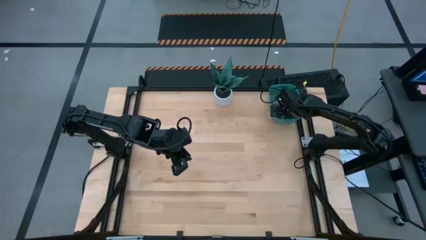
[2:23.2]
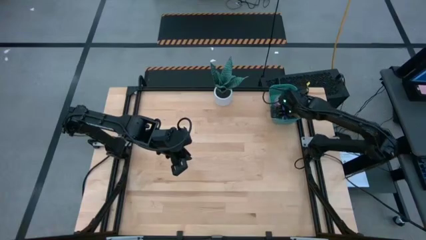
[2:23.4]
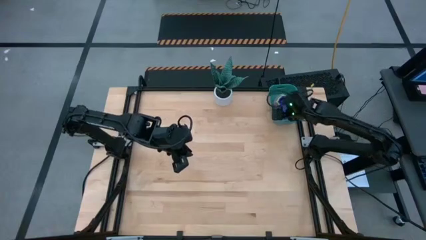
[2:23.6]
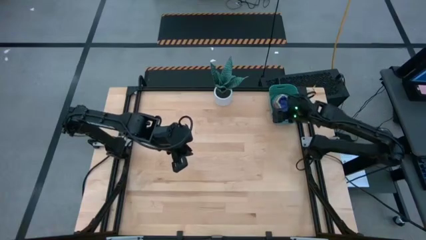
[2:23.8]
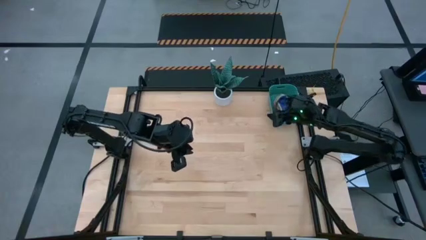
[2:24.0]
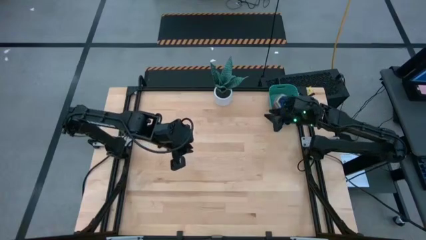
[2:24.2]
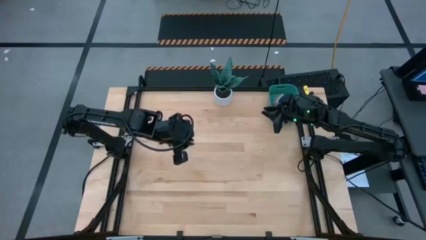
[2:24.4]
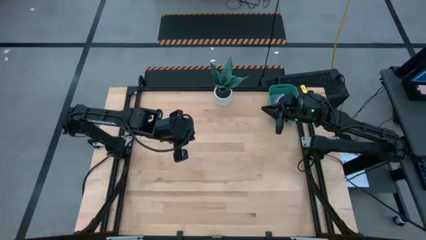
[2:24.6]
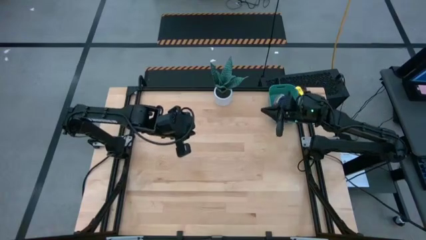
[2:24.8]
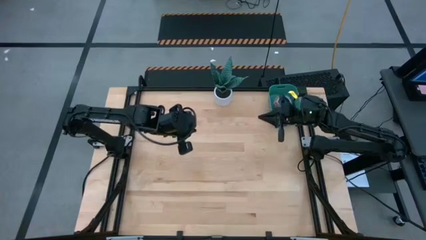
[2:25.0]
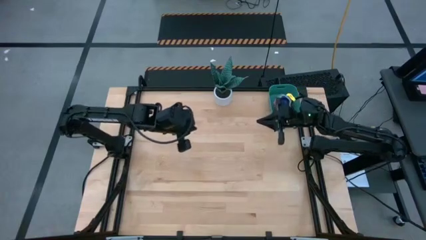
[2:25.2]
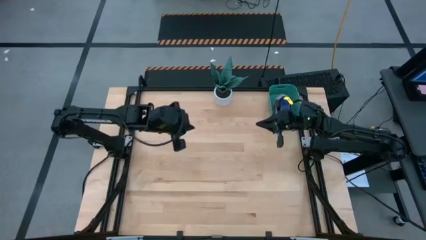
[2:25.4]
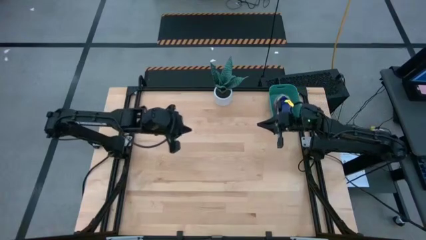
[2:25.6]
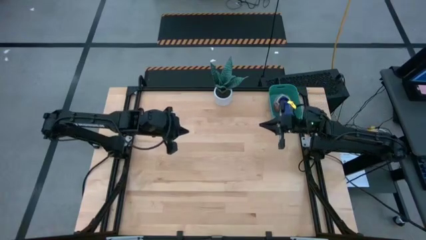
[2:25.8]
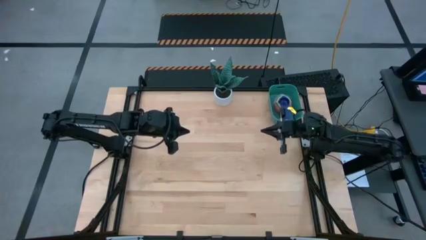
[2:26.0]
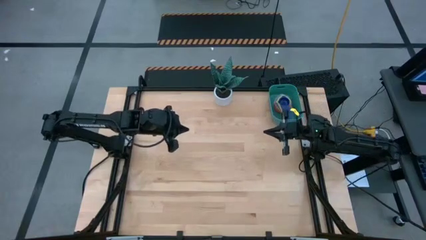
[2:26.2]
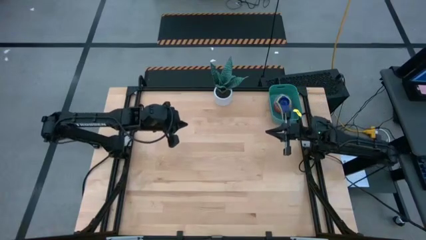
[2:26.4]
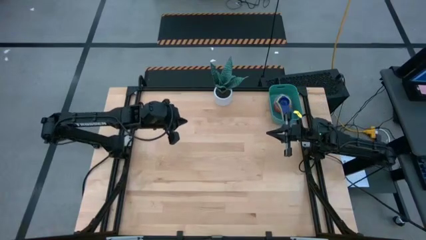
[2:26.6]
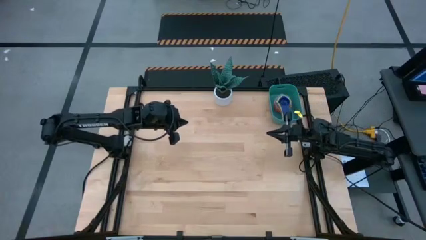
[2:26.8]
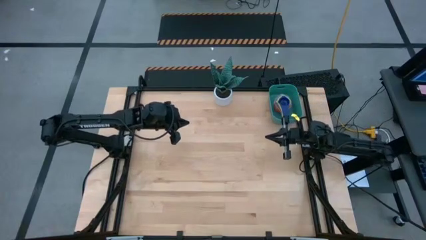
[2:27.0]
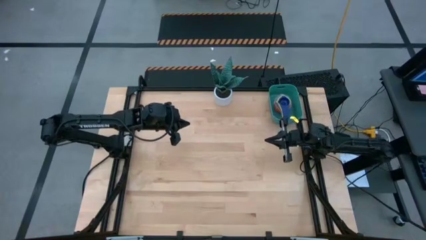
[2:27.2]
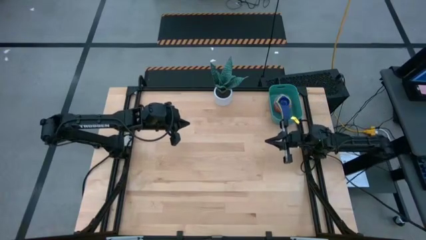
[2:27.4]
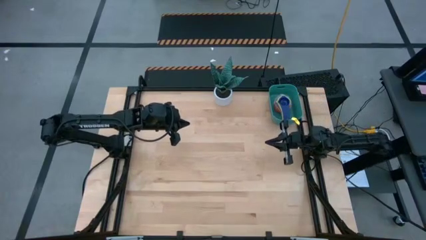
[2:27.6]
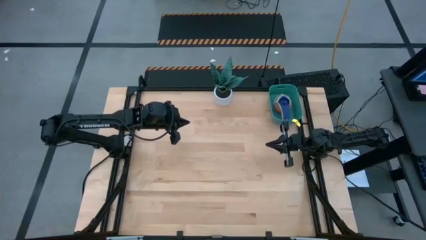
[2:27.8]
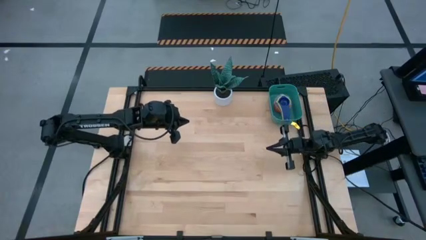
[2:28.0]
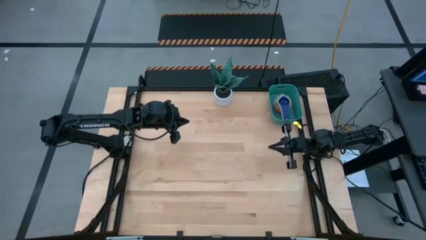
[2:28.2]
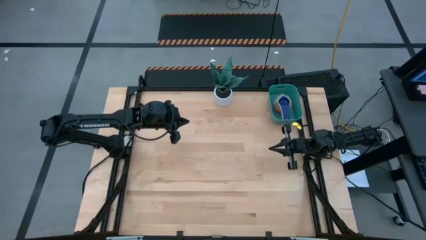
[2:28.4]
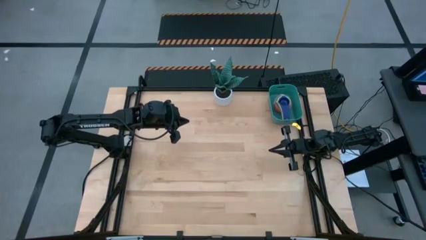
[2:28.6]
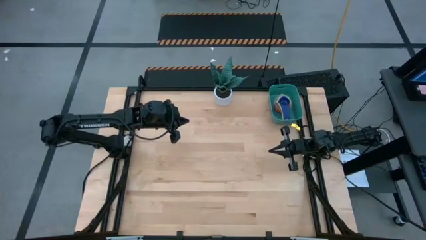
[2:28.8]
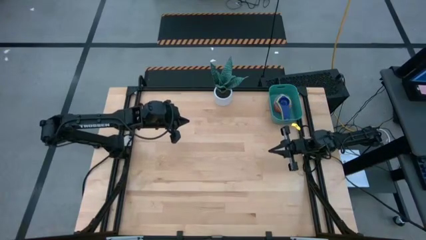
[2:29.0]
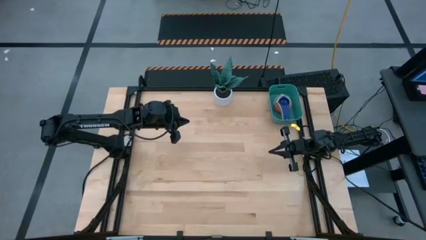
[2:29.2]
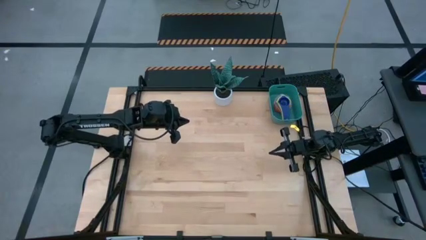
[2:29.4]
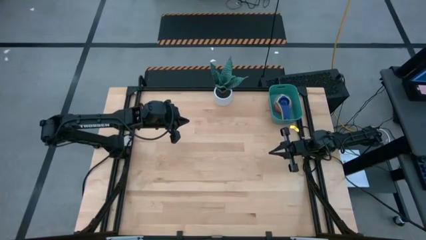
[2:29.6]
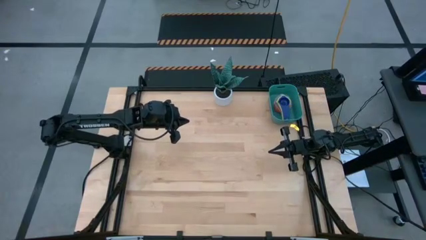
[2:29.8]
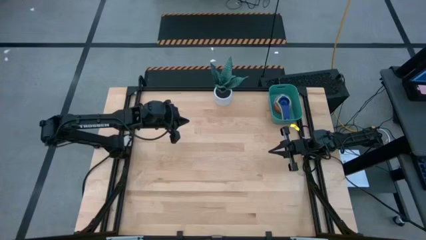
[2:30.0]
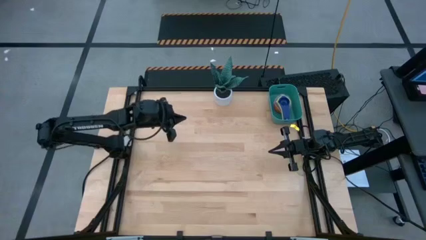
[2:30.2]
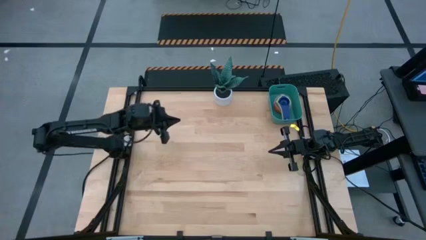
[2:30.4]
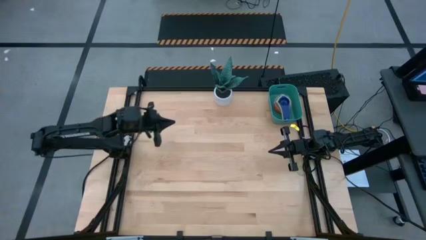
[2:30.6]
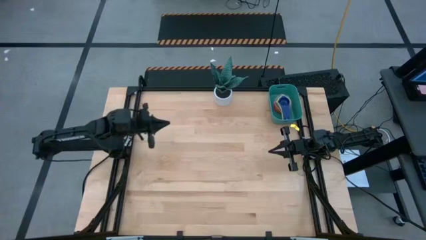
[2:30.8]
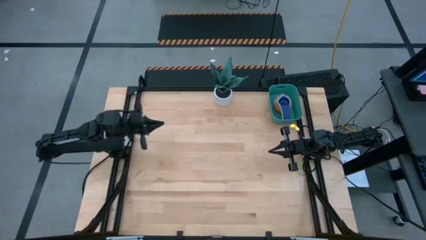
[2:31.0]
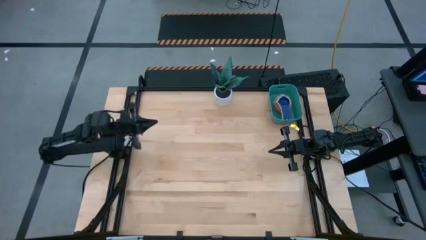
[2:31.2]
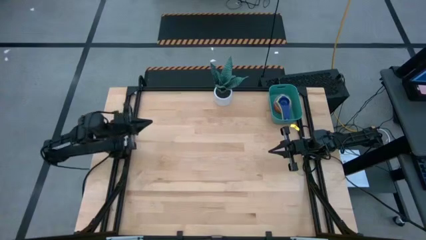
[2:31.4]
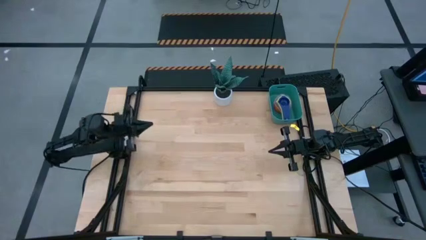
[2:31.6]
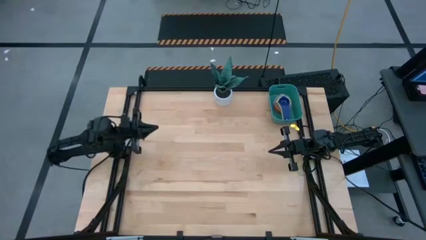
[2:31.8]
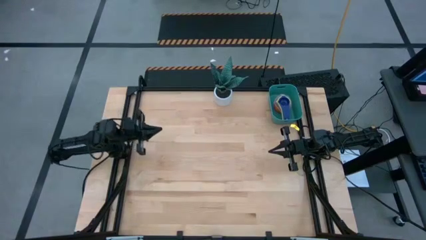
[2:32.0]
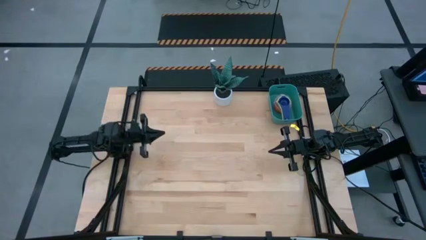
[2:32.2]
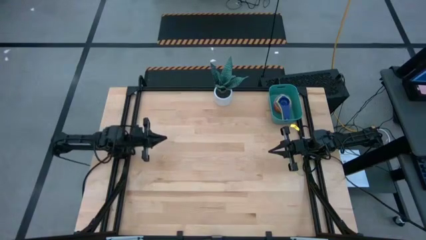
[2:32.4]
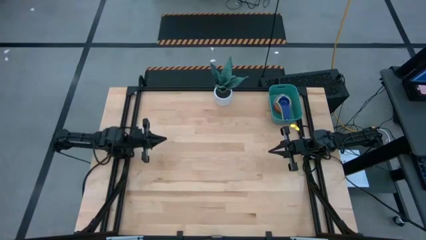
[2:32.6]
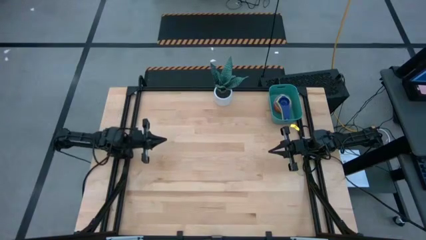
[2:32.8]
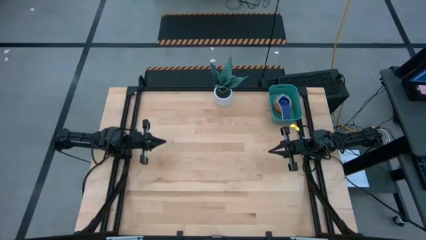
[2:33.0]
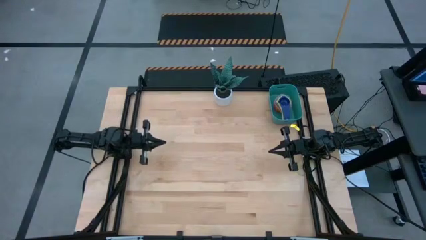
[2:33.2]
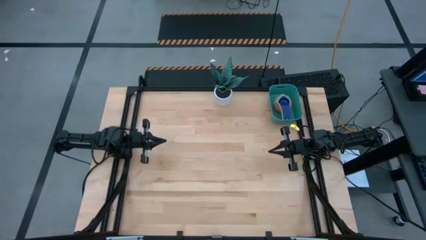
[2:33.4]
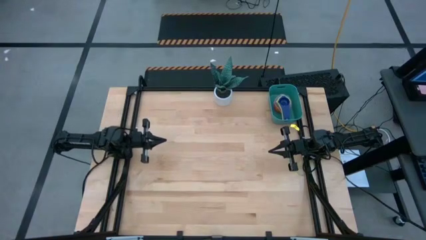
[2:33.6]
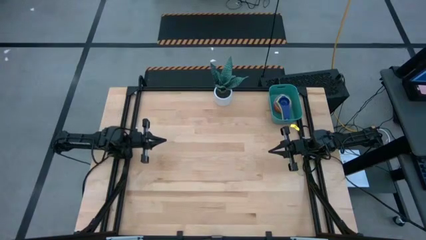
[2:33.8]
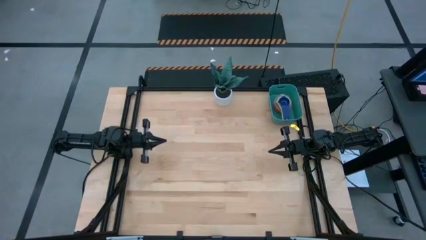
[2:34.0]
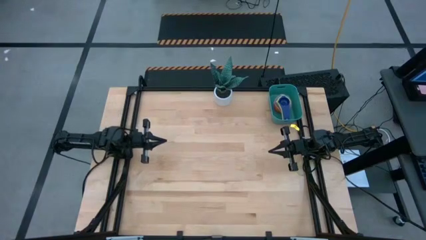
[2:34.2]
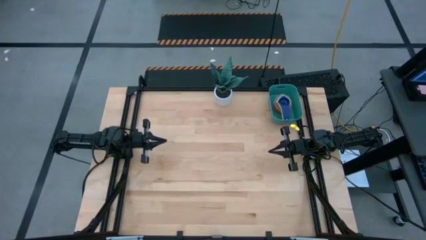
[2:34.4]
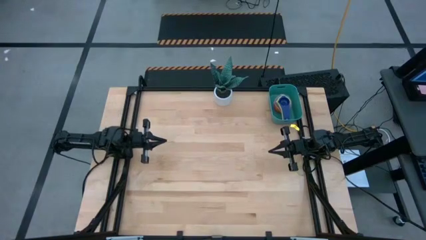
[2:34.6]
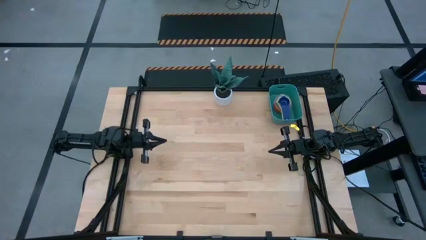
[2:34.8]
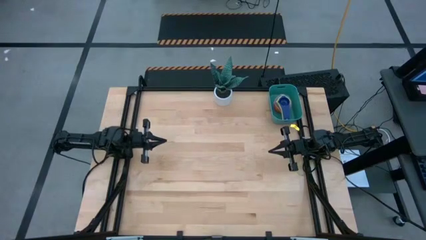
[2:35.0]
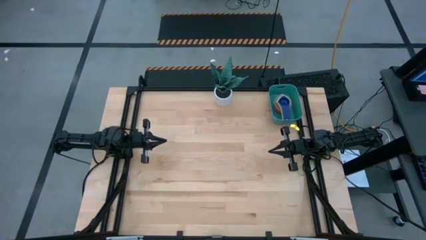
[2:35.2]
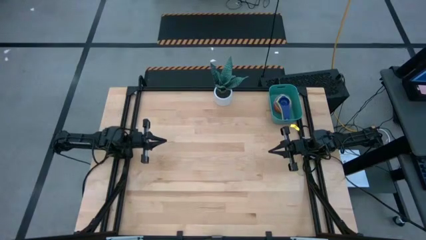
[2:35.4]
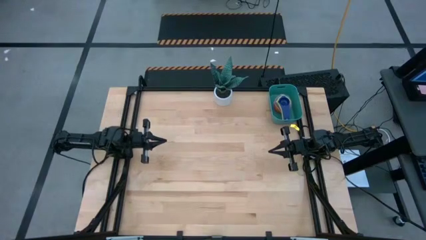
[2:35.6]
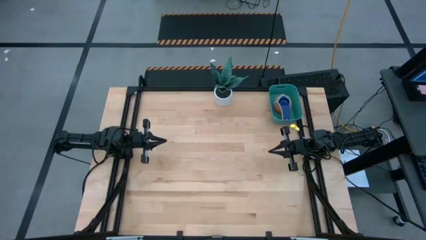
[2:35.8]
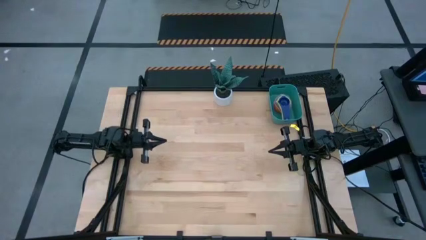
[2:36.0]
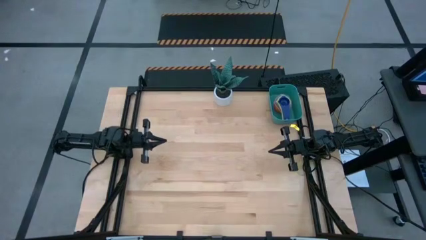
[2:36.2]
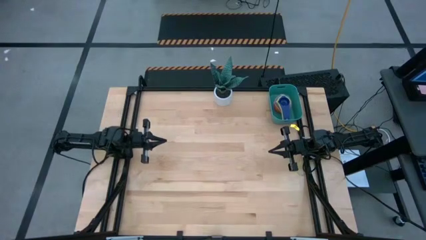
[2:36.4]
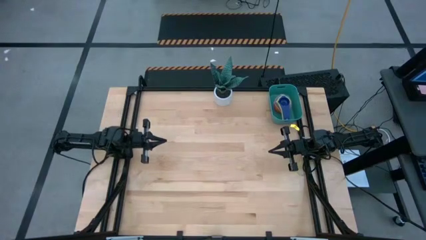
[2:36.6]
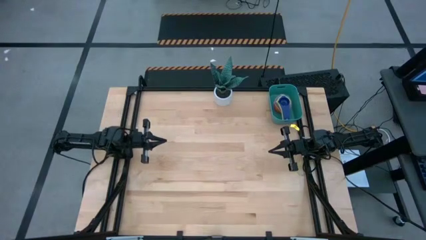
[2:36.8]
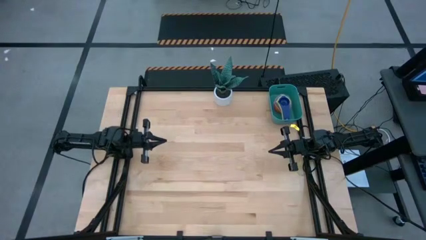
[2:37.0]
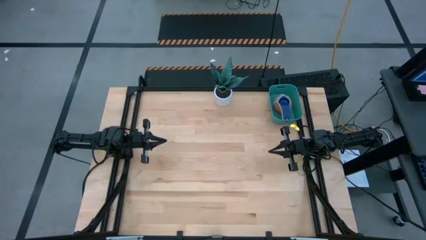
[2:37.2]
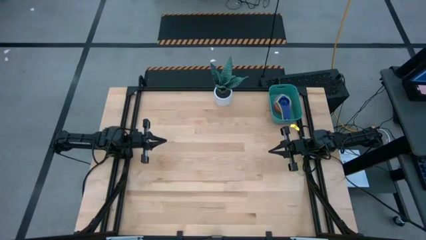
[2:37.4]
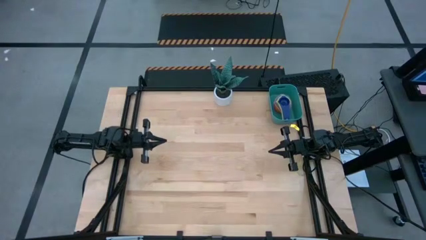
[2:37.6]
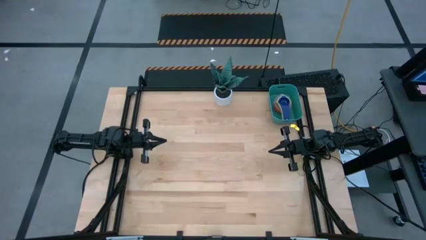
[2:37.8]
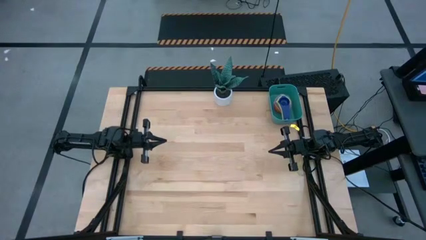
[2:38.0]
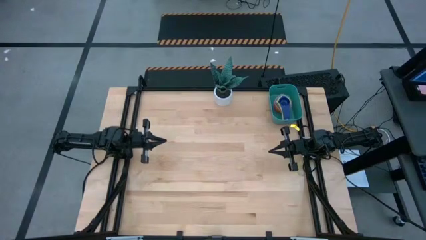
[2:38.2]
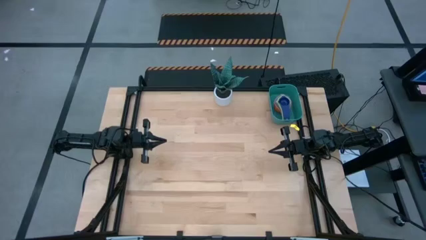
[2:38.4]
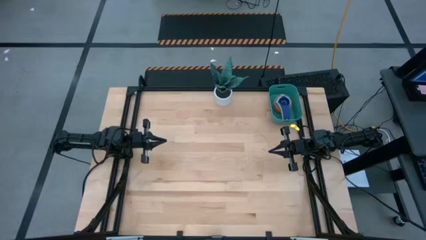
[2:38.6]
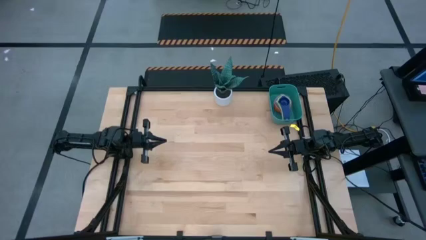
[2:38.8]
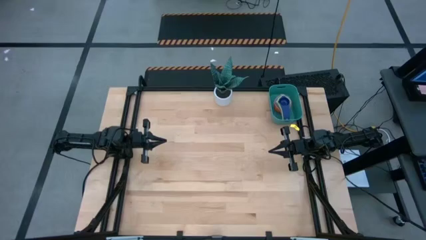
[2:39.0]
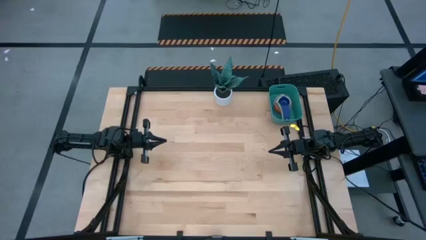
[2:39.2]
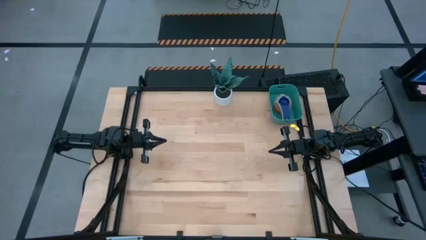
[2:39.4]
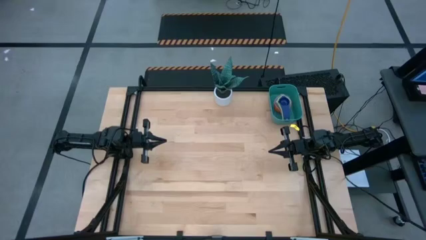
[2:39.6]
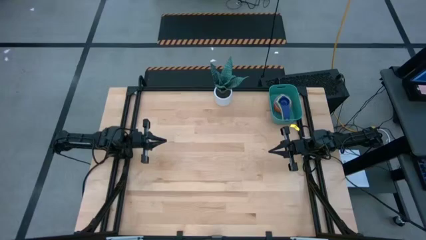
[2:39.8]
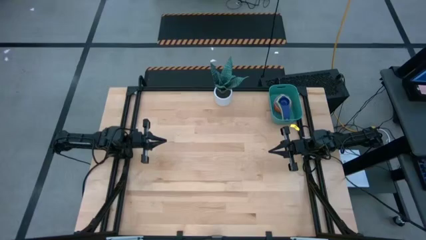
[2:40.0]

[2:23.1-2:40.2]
Task: Nest measuring cups in basket
Return to Home Position
